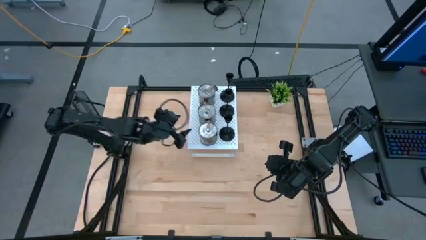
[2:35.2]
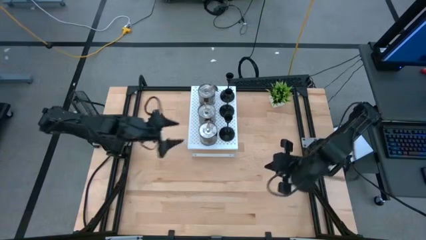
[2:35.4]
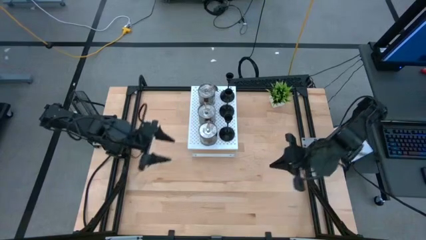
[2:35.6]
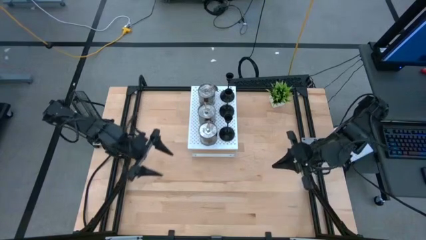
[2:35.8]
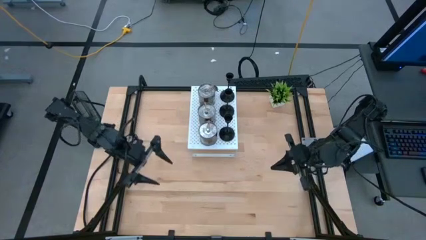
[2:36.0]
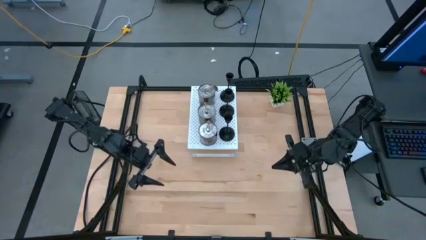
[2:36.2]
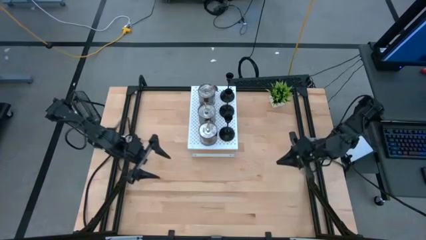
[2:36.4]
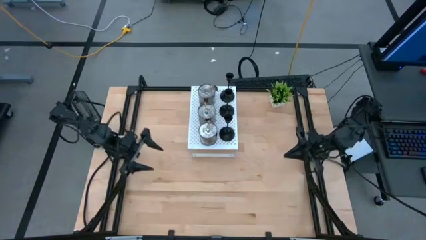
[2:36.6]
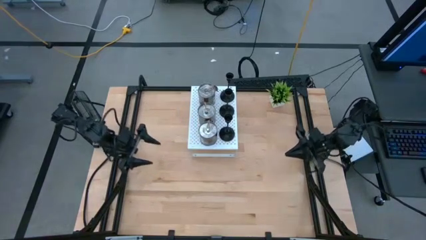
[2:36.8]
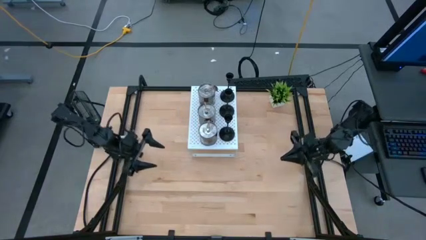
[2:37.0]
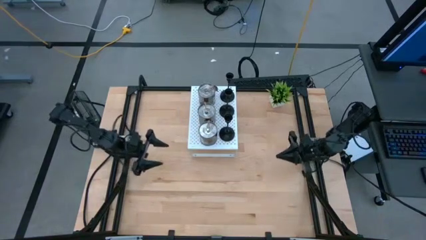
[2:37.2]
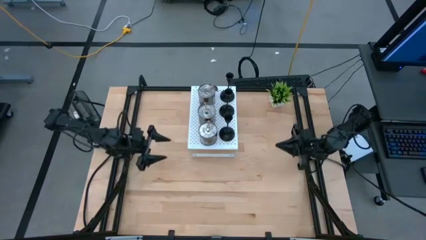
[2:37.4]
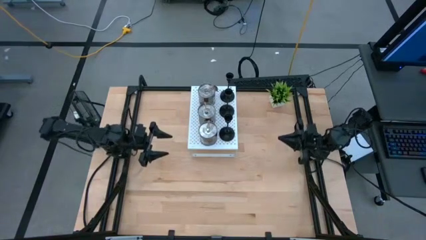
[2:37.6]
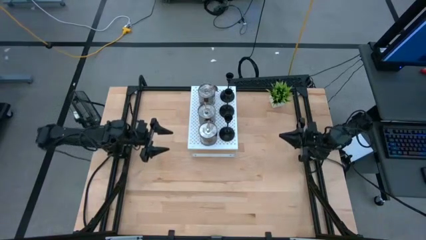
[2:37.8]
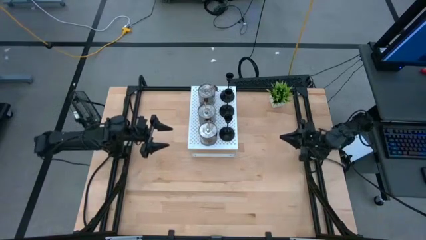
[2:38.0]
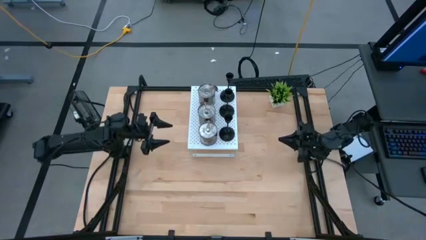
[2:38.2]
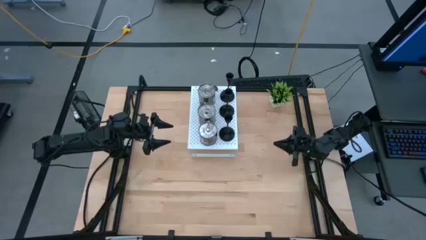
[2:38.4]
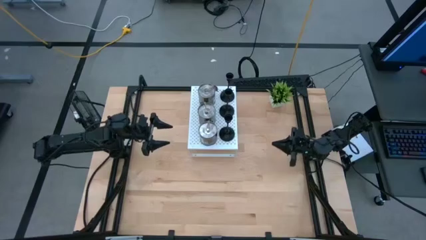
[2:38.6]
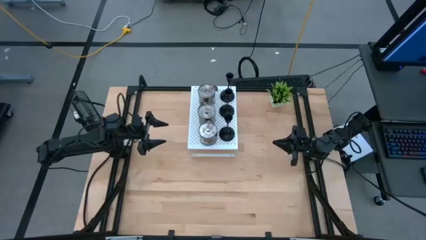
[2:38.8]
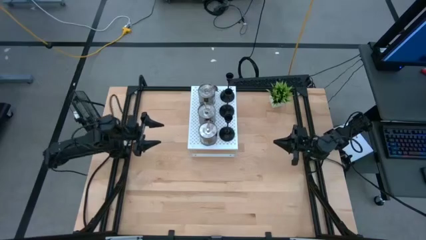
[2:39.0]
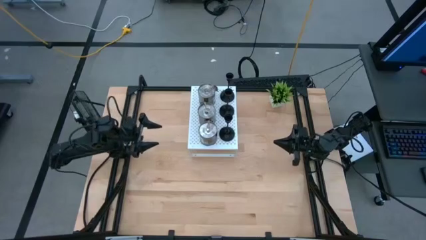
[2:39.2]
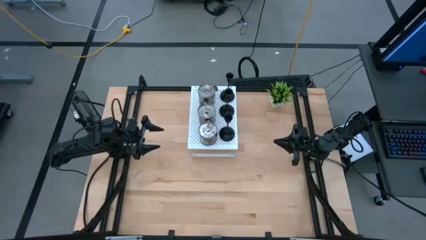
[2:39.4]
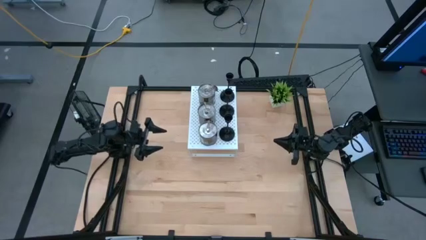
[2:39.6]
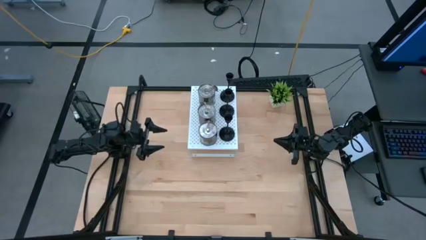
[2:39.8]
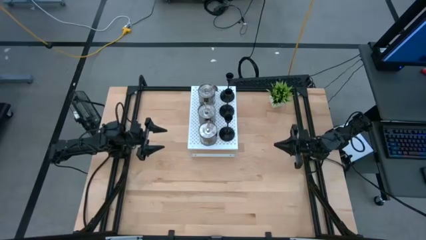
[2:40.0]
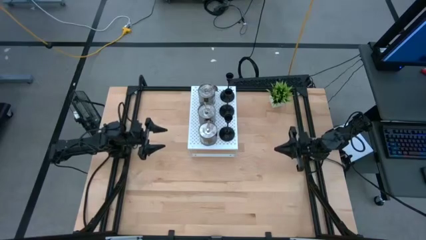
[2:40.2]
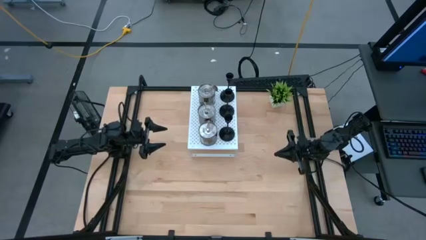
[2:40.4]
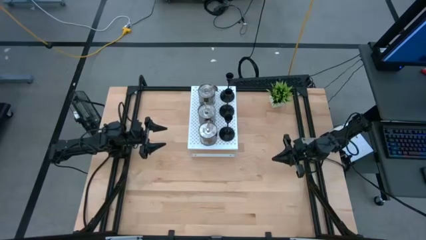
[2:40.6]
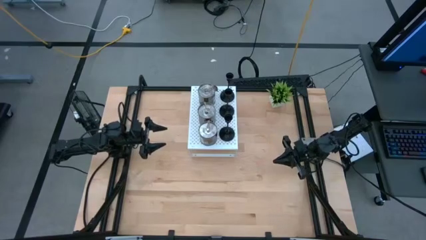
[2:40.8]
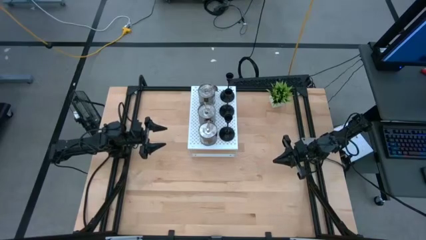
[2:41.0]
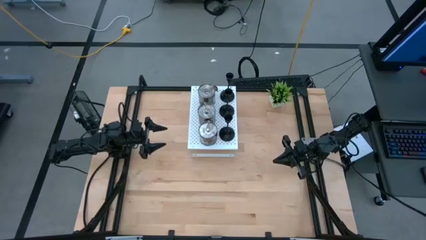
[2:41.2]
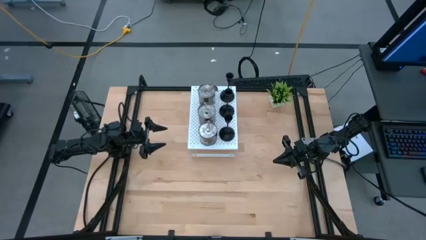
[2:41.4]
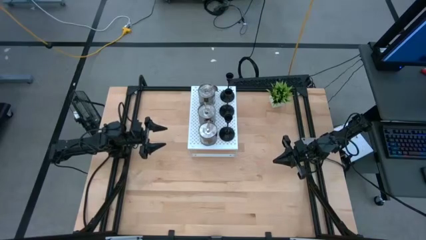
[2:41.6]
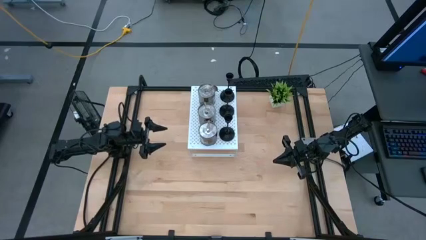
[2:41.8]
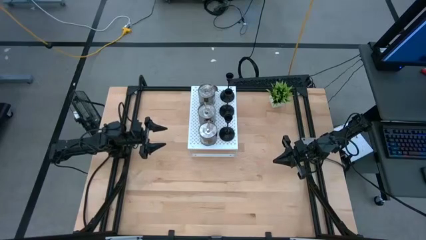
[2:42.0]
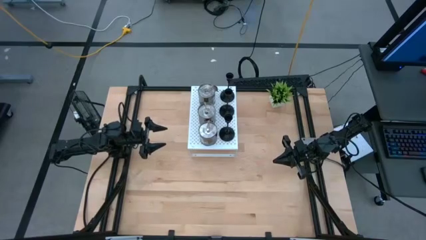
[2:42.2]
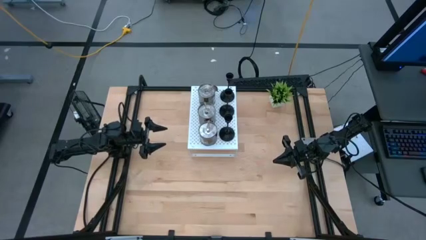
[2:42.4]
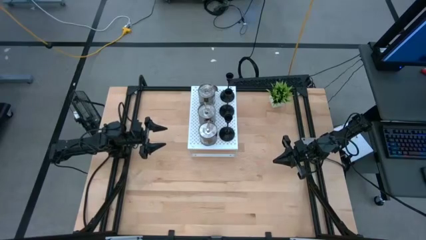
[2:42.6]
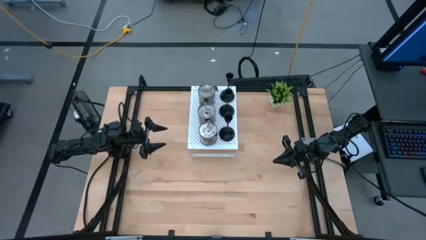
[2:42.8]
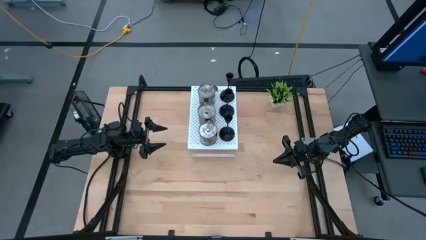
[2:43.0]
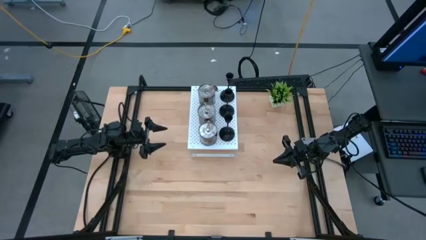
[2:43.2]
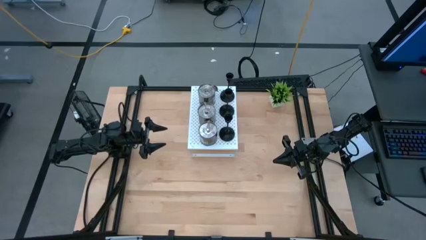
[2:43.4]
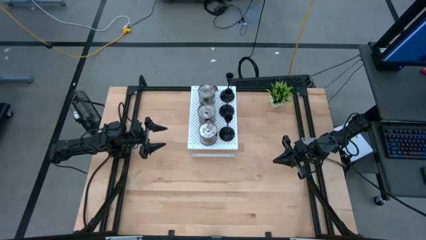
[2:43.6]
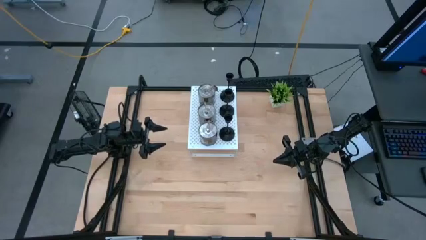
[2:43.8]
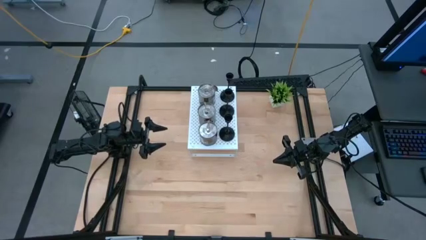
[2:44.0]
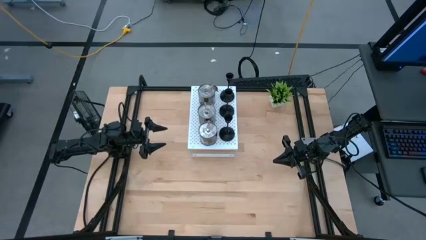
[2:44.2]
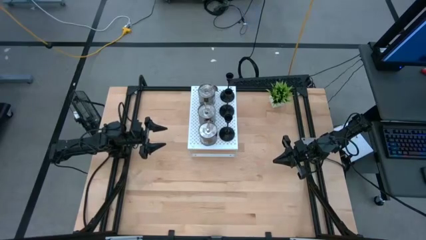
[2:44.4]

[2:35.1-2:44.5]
Task: Pick & Place candle stick holders
Return to Home Position

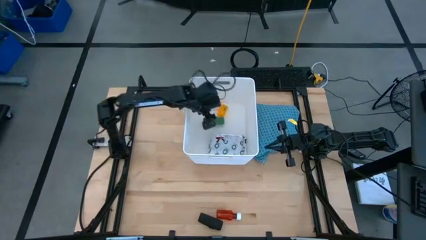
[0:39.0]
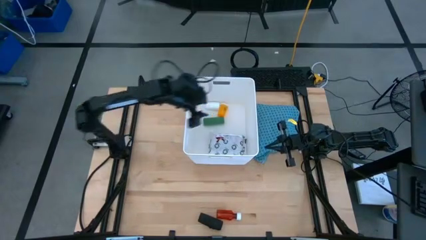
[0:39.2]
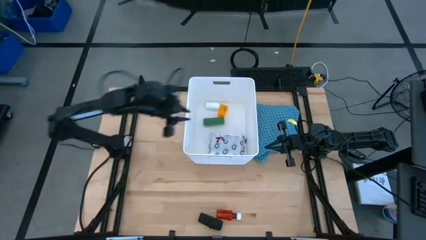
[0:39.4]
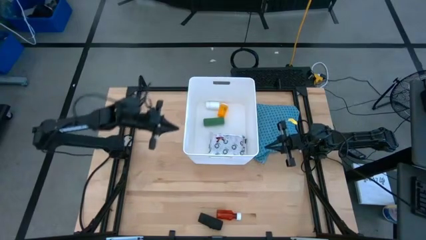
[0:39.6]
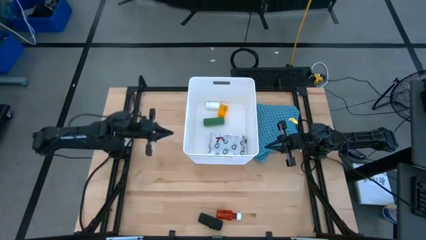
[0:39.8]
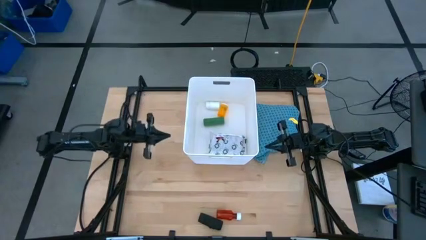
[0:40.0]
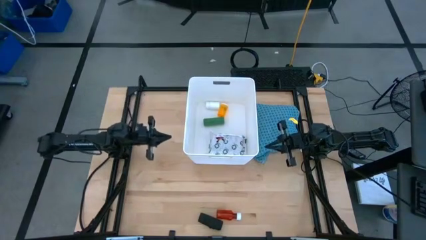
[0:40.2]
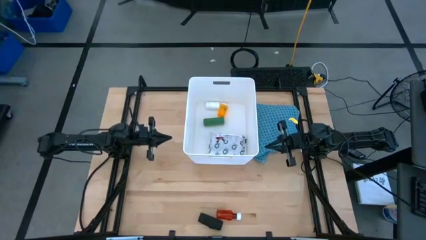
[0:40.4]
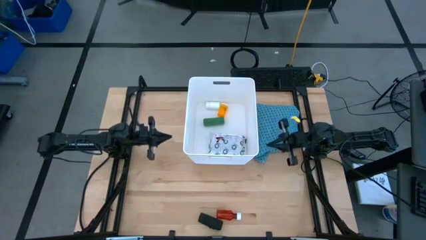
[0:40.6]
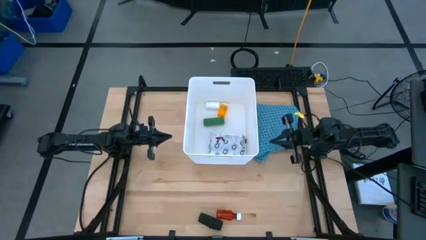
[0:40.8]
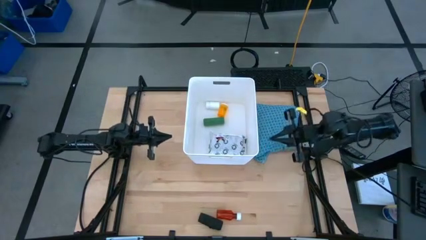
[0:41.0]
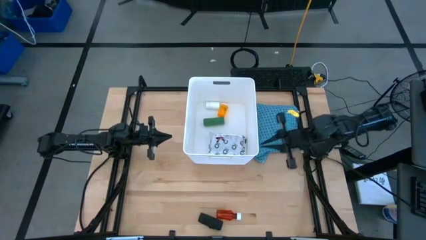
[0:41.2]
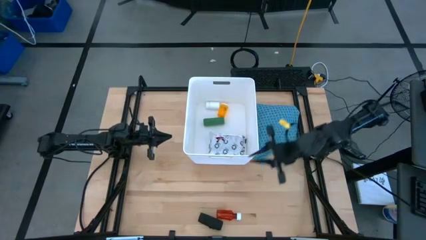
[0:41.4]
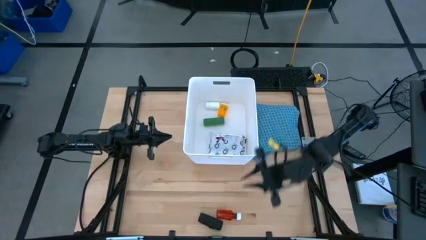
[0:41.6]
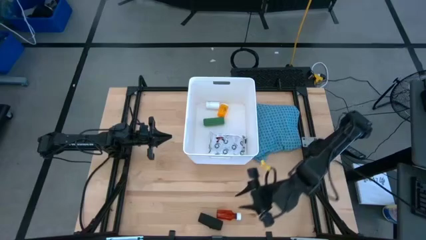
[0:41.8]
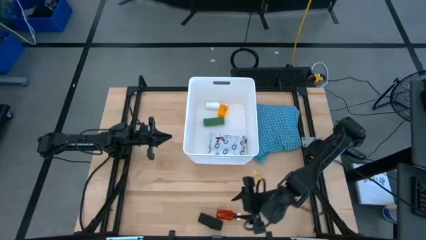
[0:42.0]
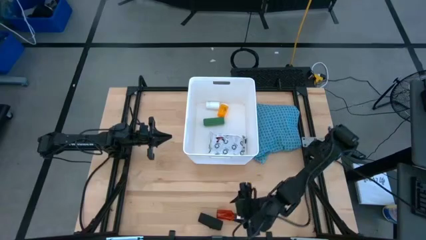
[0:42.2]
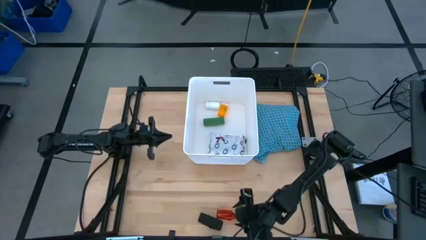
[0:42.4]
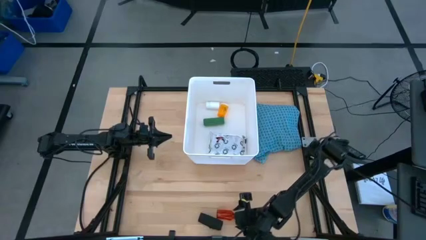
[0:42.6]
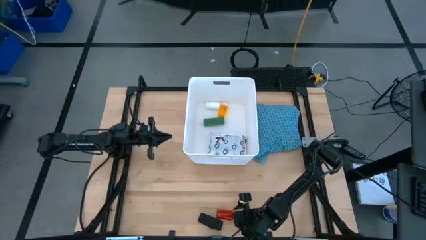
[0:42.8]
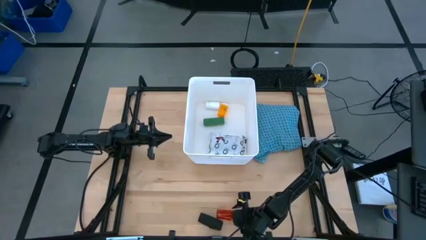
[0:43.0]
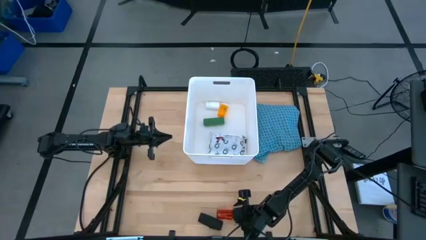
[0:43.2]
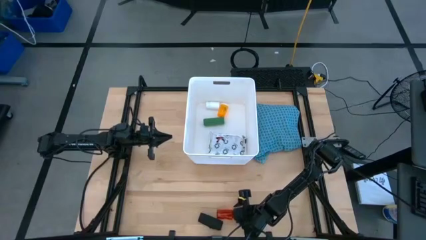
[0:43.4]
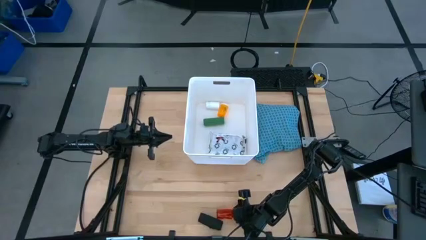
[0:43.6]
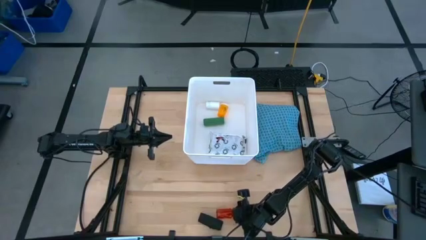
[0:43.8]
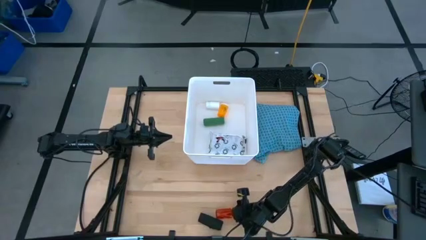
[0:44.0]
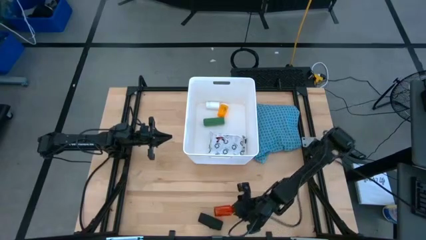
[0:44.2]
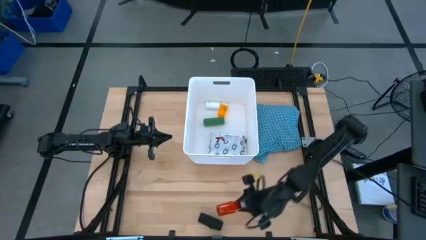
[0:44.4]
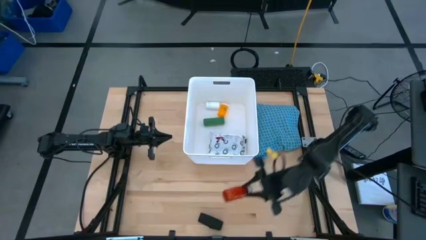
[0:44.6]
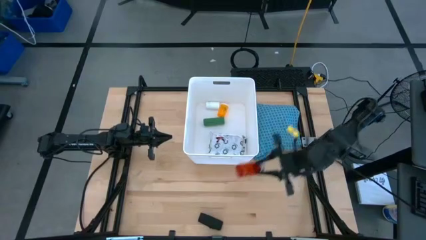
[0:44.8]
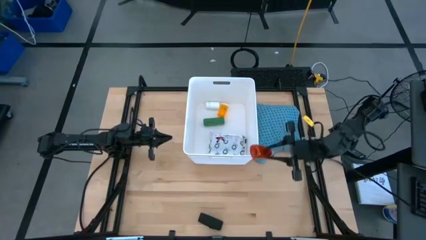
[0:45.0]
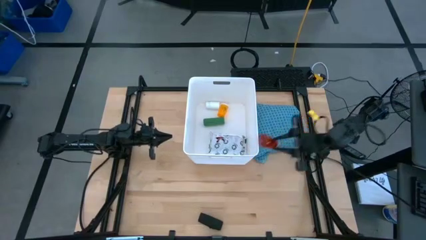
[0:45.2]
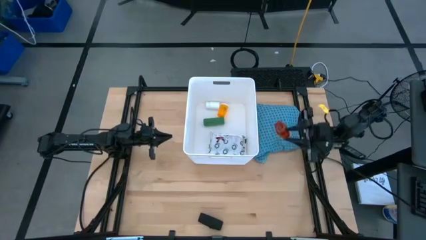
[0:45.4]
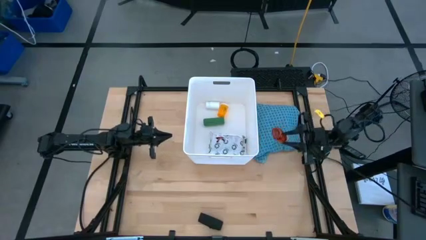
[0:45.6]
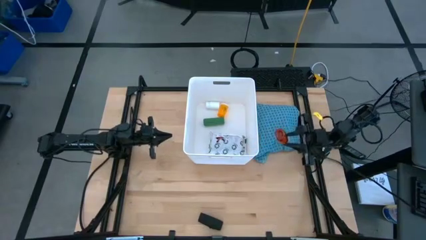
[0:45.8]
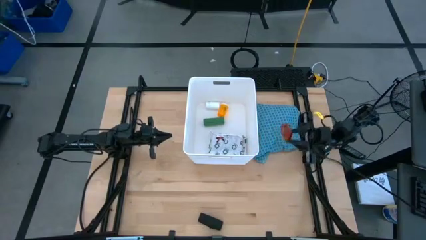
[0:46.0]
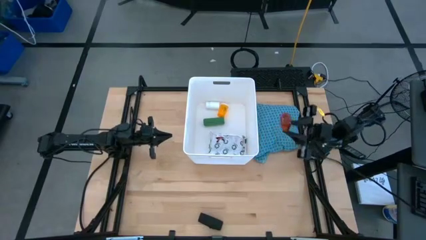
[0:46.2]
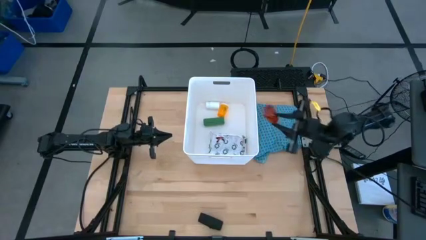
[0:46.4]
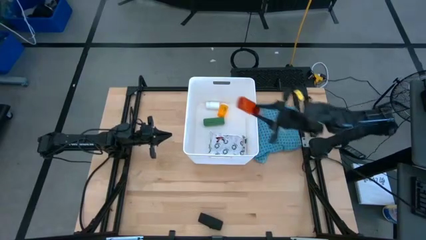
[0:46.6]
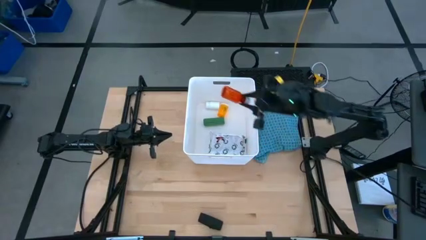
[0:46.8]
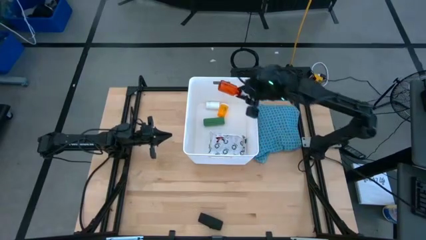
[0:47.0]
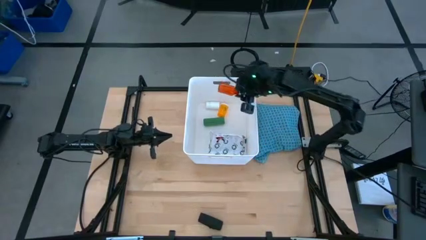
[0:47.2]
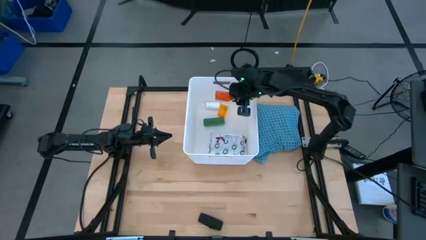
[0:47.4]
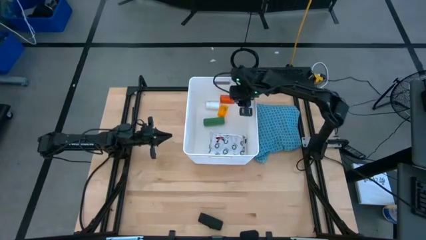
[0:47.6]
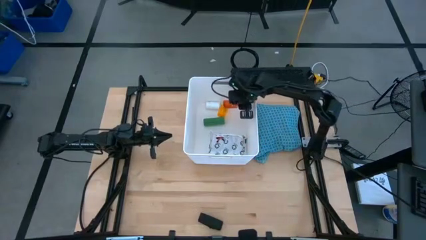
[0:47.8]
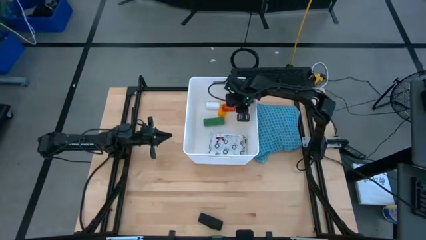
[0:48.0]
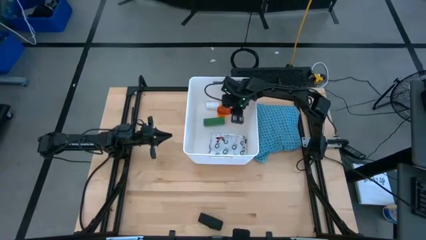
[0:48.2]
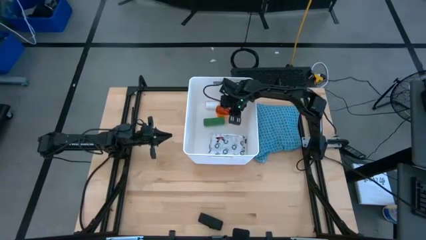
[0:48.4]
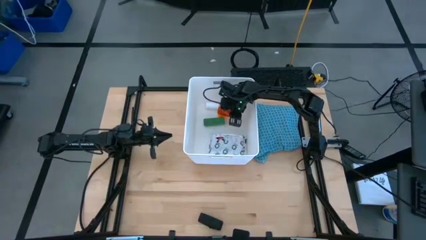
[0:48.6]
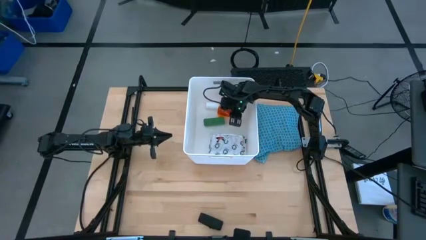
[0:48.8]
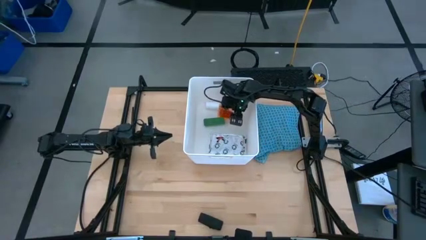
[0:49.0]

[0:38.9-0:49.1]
Task: Pick & place medical supplies in basket/bin
Put the red bottle into the white bin
